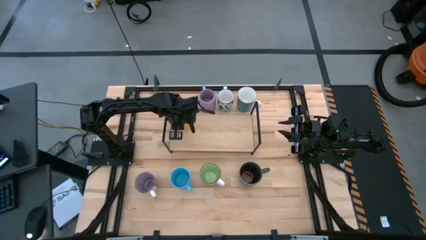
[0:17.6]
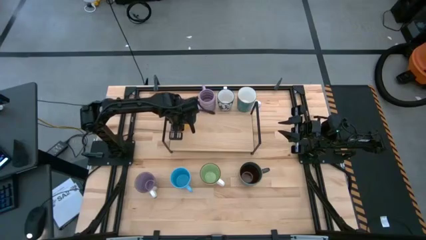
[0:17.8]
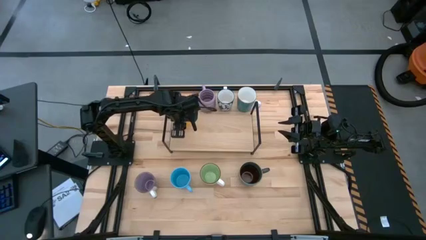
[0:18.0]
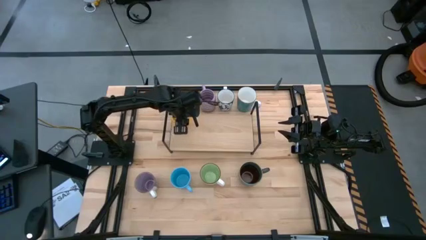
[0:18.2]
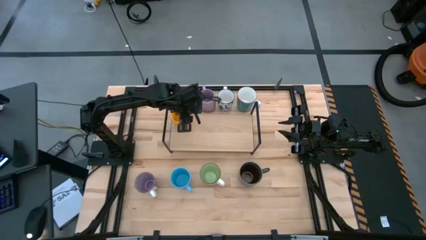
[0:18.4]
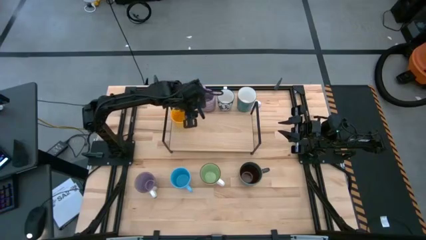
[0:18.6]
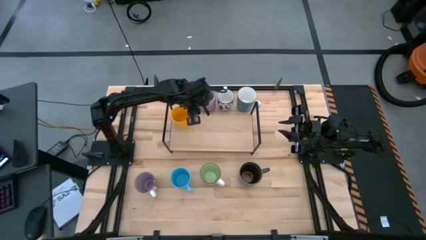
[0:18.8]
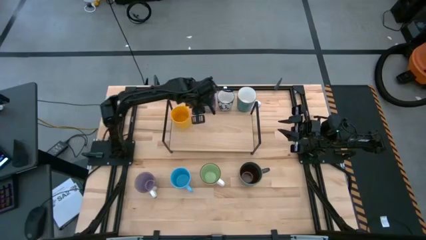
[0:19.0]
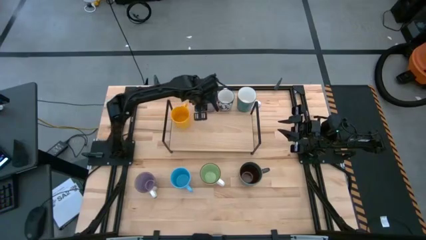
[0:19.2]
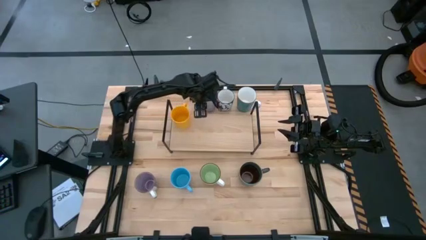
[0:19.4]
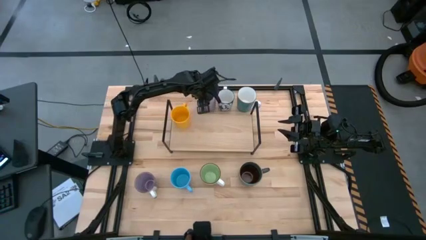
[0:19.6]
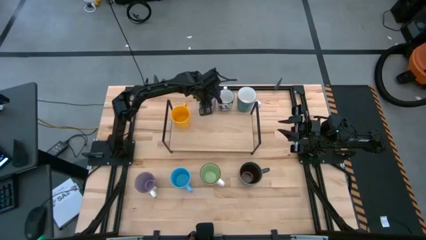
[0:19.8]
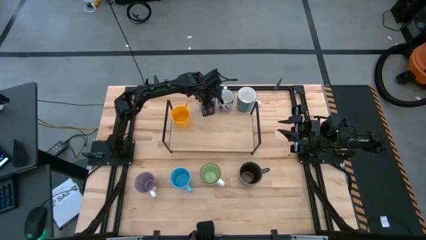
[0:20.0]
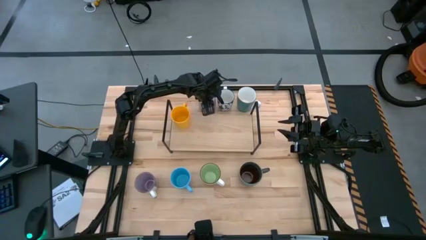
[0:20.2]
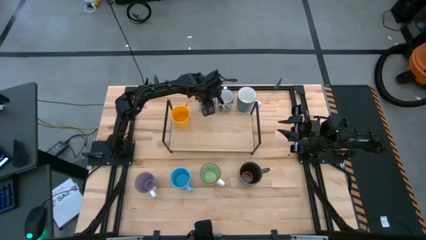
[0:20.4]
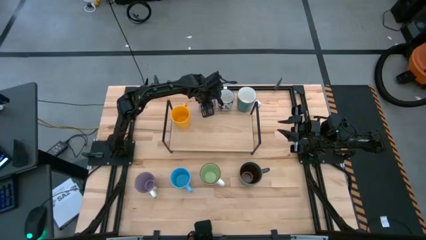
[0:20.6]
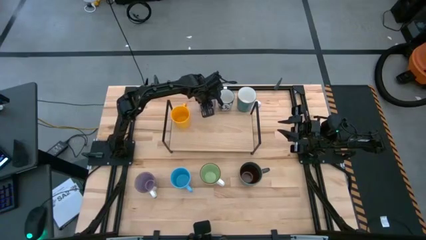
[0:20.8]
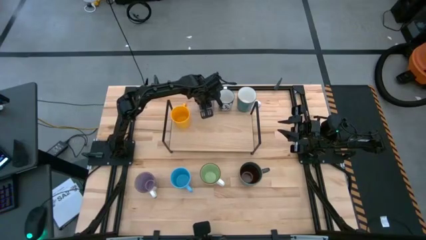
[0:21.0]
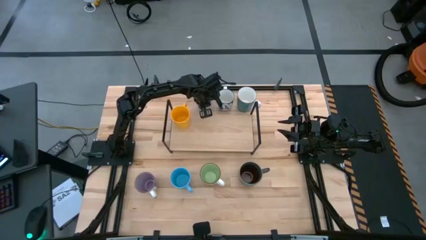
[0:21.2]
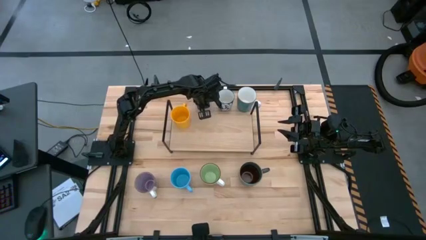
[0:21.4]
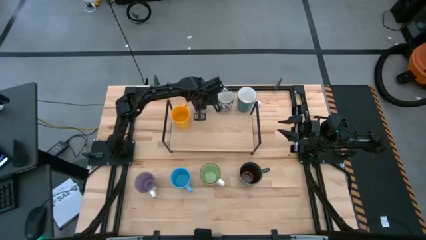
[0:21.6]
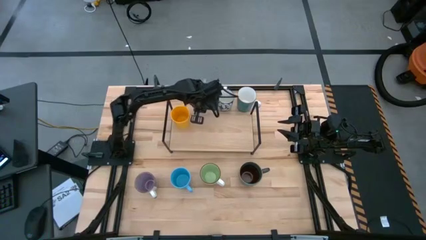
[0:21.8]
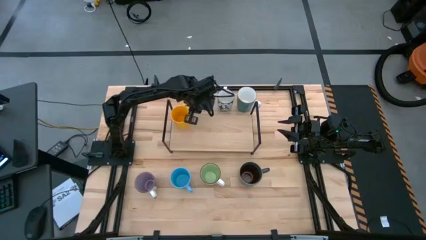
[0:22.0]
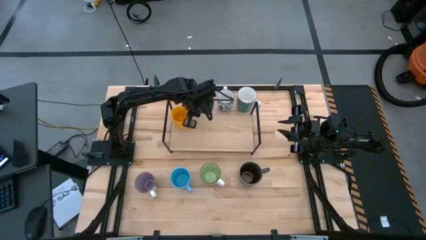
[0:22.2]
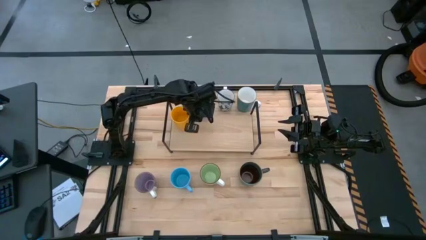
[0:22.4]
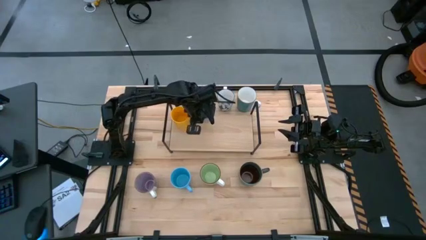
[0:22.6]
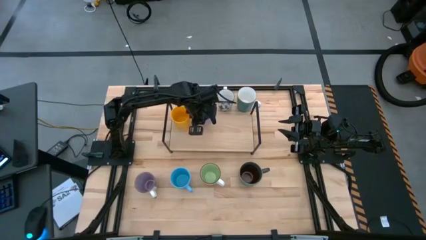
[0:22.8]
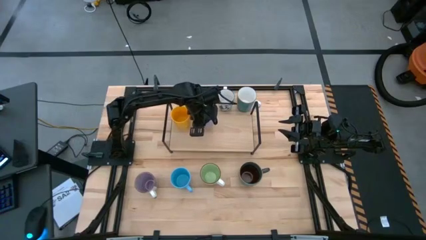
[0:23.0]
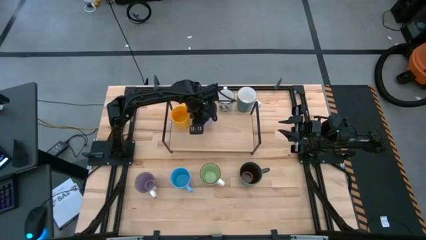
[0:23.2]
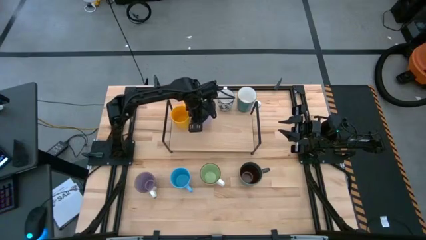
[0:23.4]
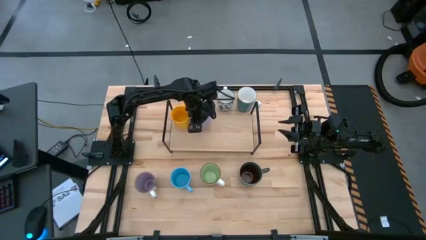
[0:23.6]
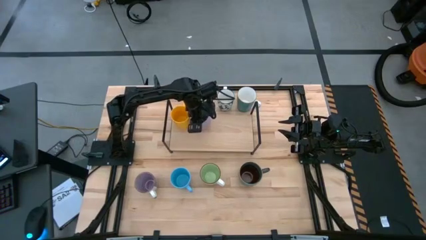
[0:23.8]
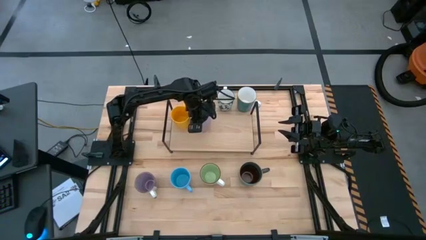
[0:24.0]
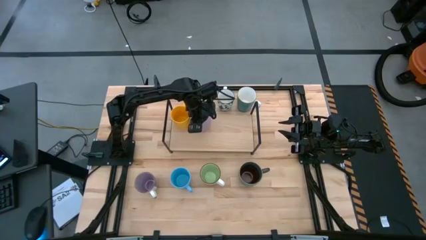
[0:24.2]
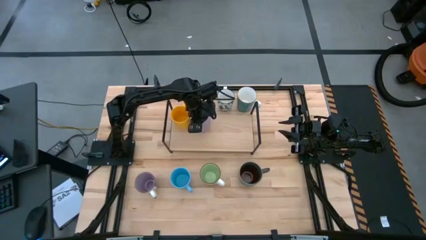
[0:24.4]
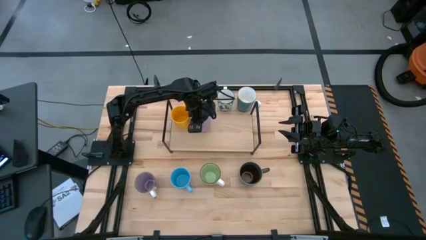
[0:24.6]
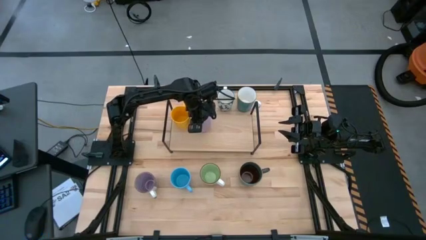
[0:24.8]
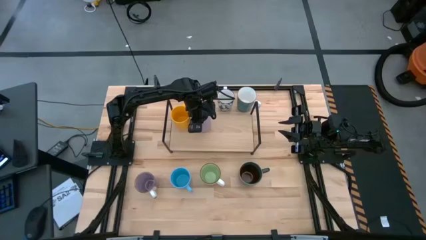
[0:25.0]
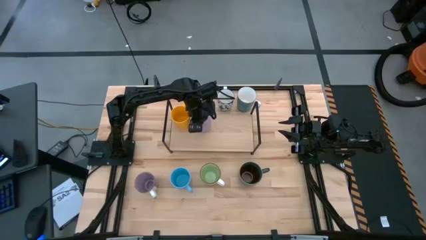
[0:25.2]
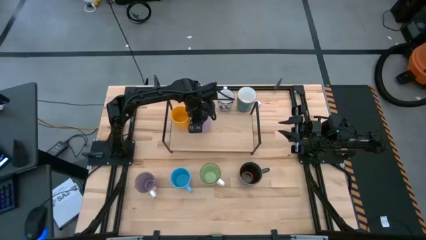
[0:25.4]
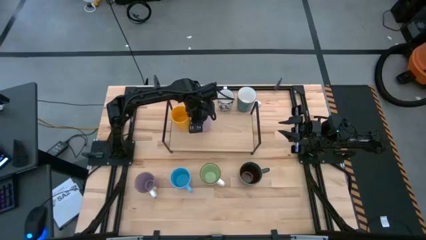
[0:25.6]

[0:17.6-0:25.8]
Task: Place coffee mugs
Put the light violet mug on the shelf

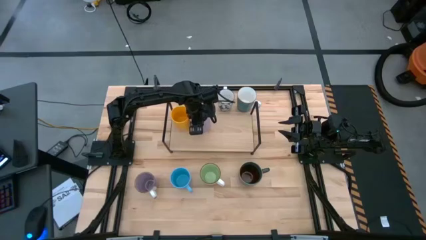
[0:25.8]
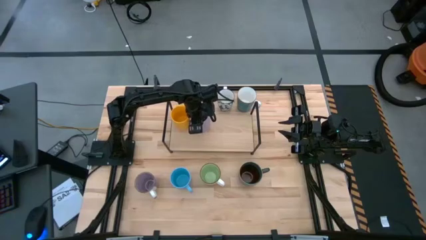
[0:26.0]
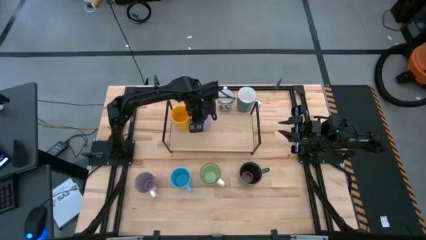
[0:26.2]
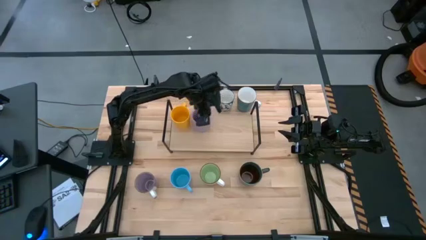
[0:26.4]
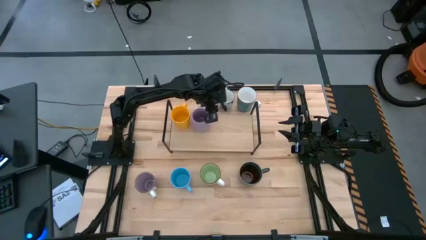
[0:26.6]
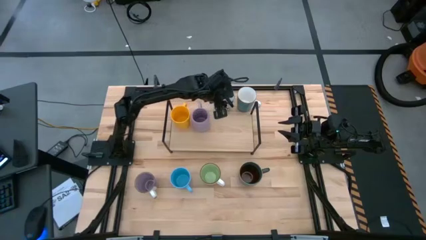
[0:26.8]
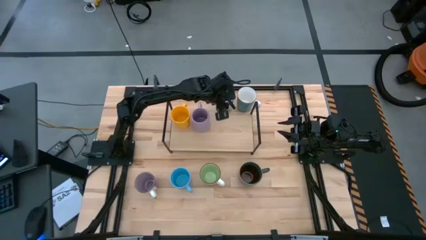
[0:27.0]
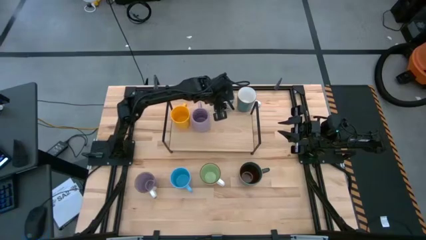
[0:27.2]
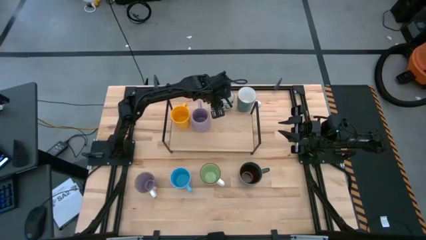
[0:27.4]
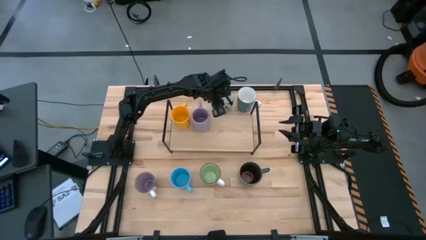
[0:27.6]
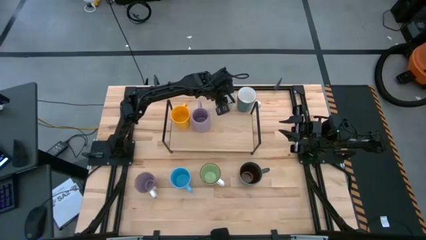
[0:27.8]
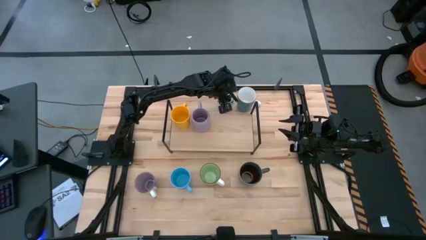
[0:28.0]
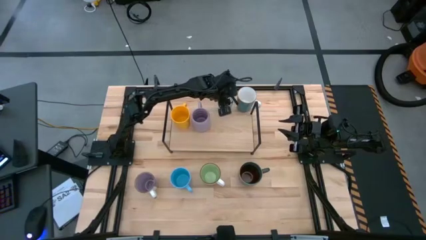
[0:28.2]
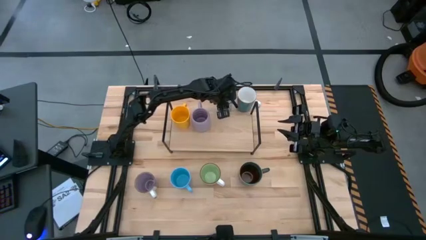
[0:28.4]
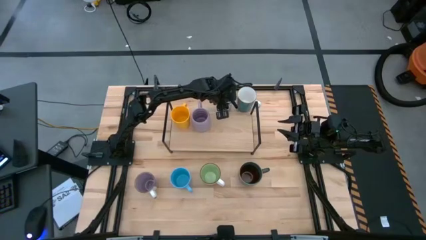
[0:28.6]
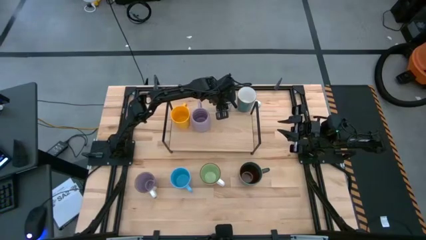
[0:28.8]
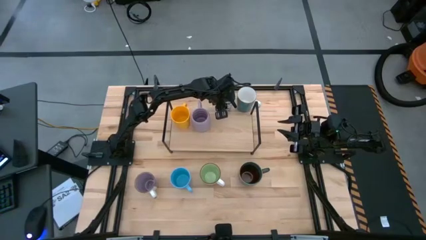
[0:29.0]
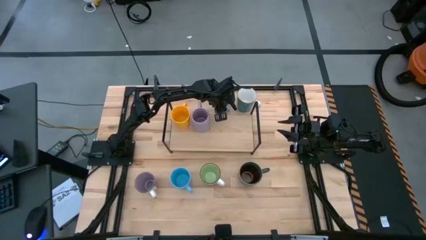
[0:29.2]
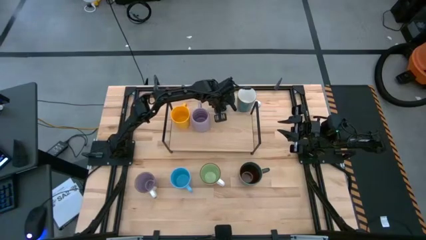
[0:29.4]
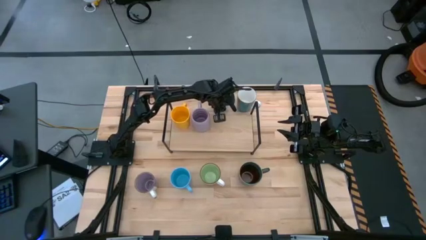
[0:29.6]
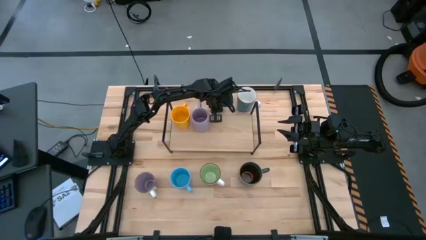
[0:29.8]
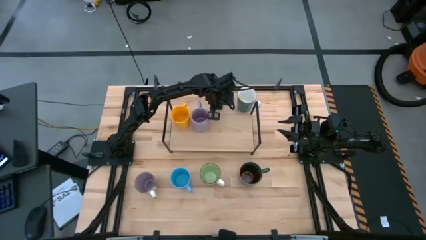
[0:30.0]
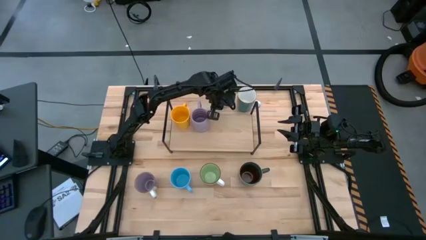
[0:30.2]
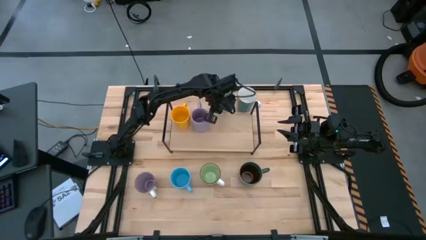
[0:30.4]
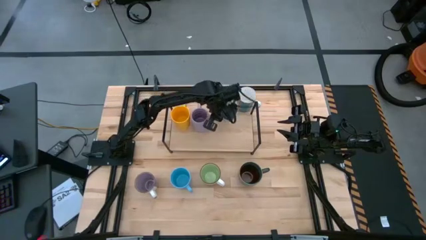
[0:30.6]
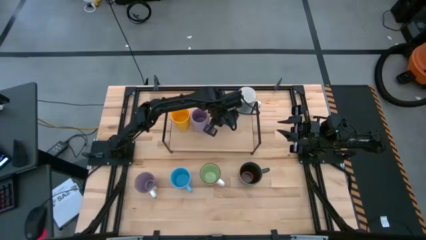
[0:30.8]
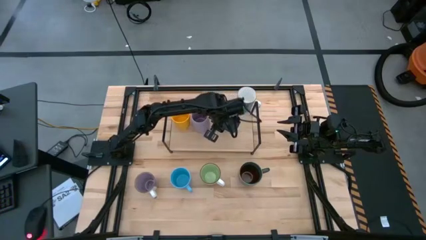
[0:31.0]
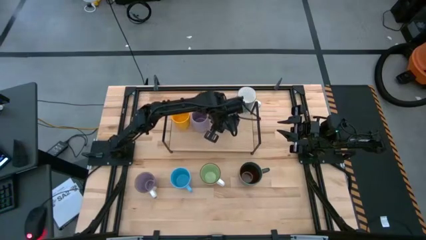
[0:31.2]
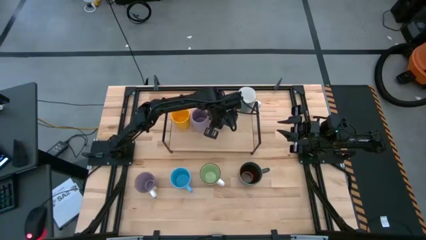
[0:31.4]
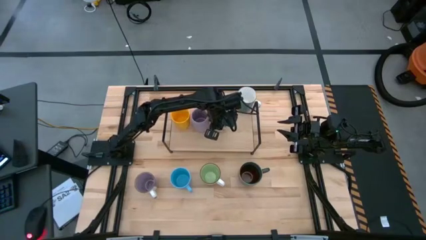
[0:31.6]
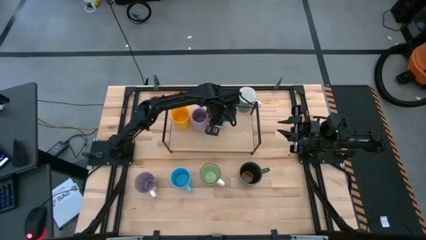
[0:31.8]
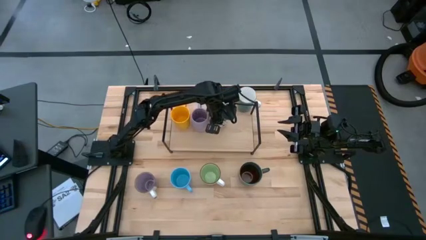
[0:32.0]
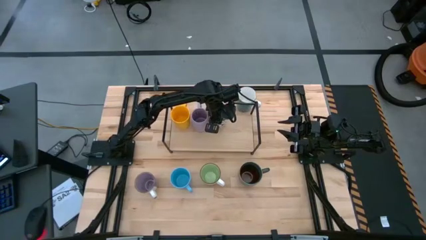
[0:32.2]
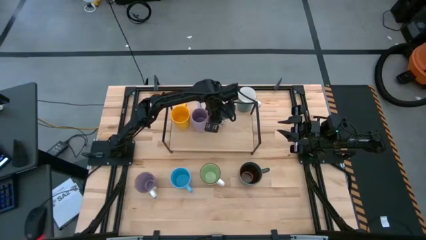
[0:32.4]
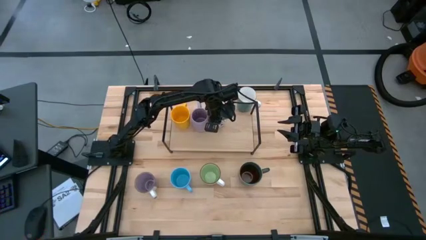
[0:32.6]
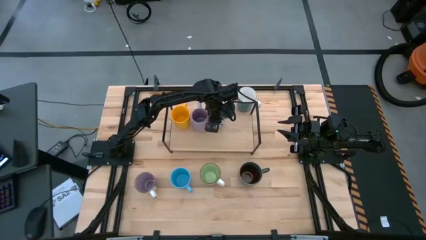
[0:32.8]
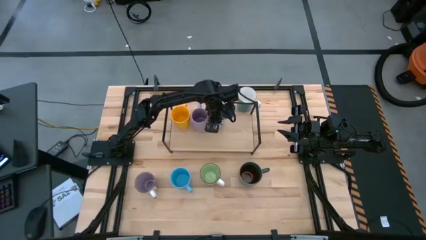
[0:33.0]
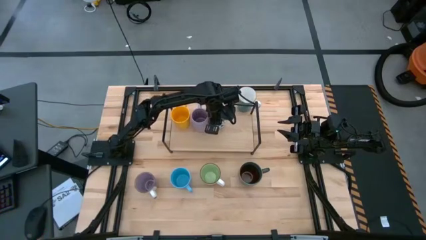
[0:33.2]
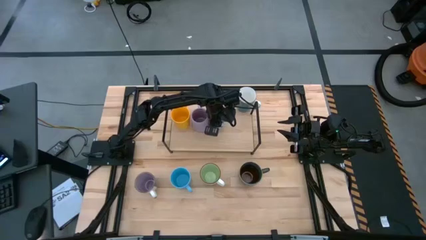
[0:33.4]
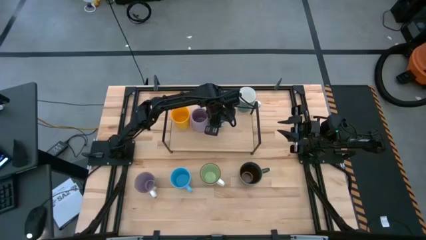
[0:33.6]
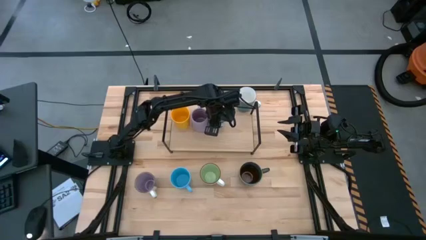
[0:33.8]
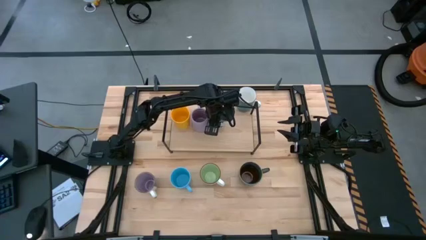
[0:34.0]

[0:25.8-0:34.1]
Put the blue patterned mug on the shelf
